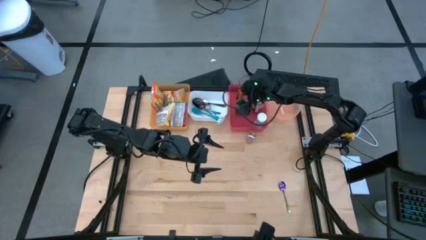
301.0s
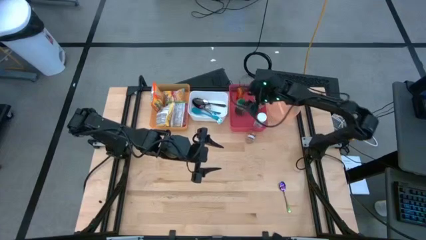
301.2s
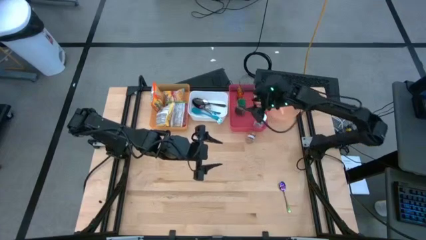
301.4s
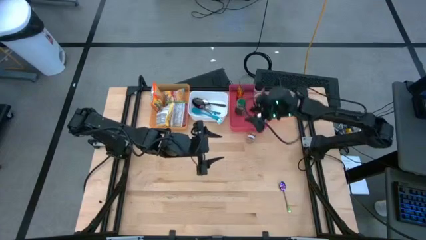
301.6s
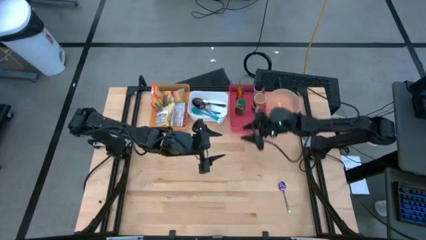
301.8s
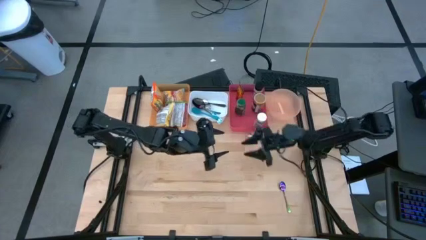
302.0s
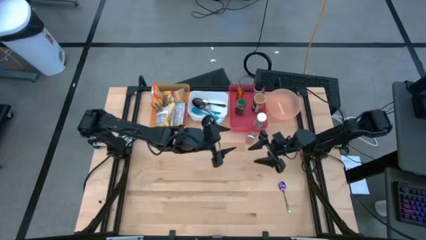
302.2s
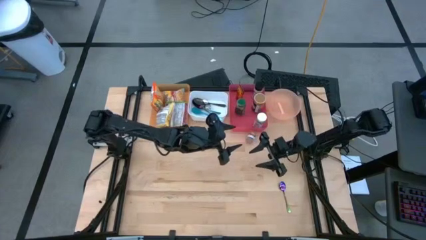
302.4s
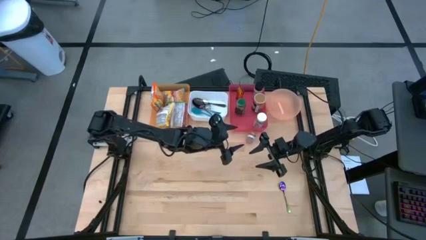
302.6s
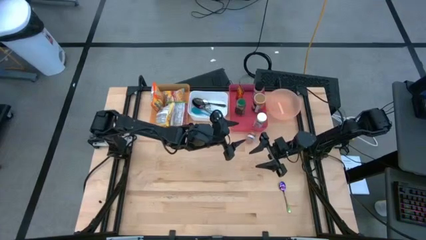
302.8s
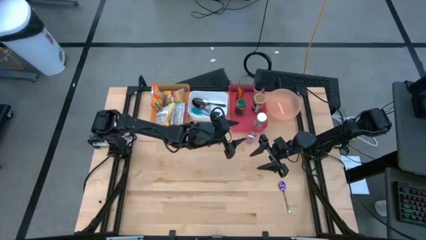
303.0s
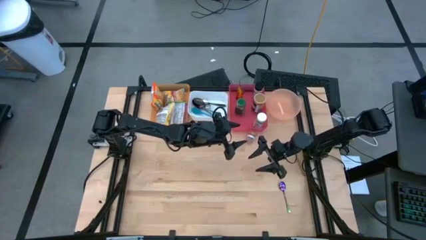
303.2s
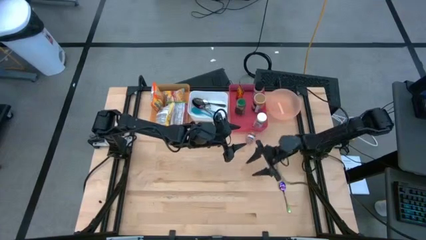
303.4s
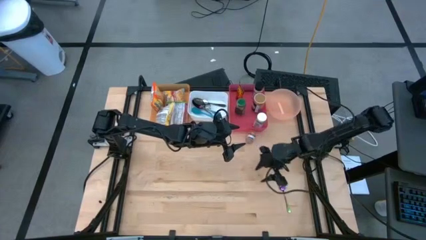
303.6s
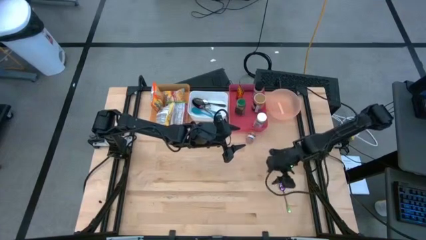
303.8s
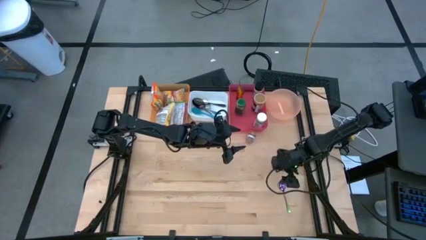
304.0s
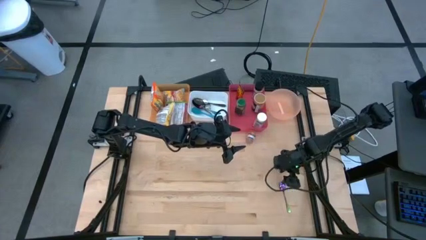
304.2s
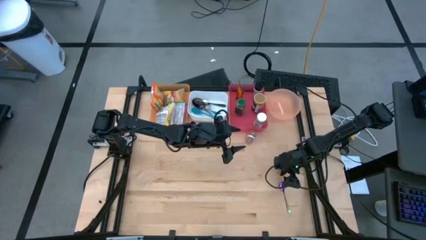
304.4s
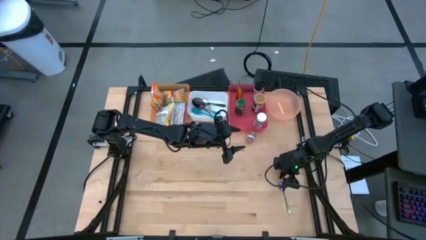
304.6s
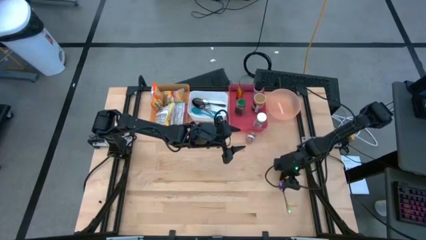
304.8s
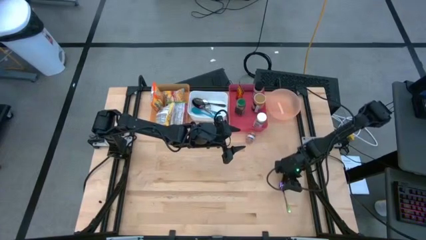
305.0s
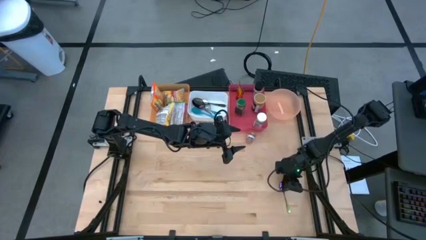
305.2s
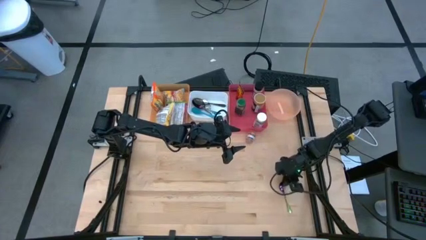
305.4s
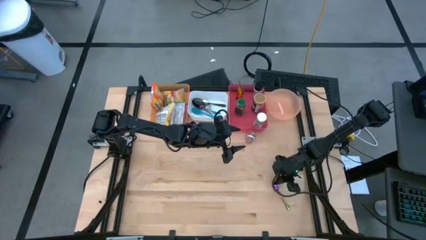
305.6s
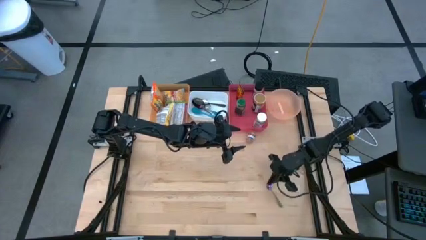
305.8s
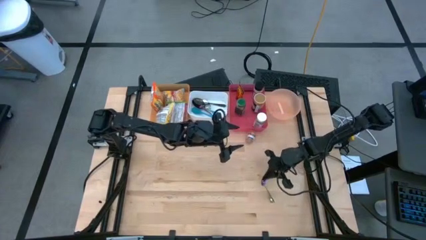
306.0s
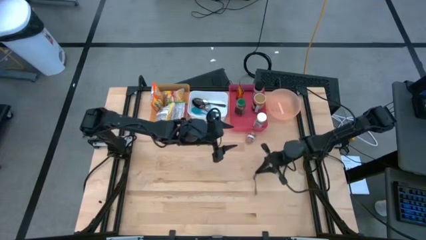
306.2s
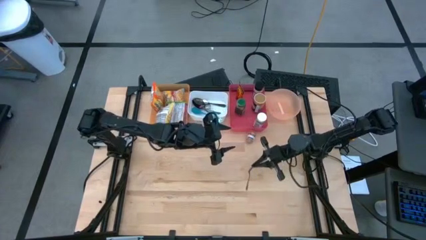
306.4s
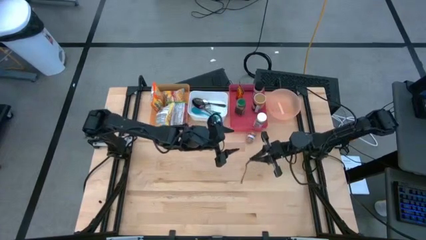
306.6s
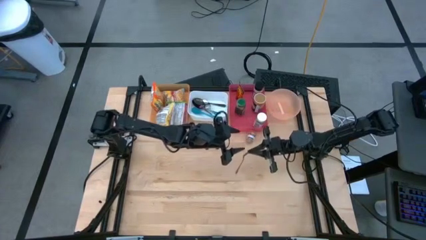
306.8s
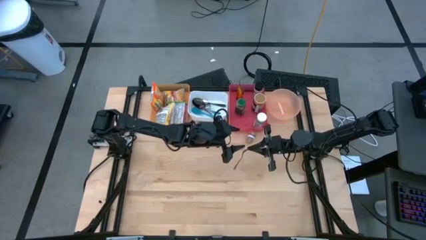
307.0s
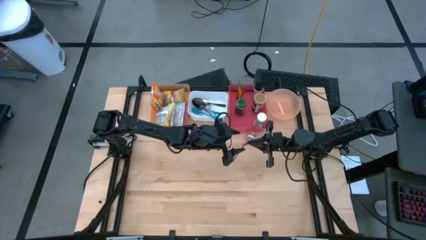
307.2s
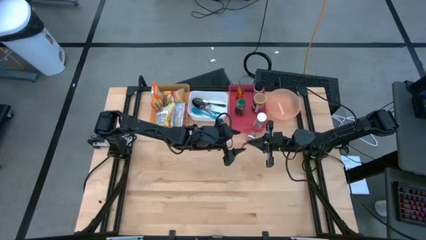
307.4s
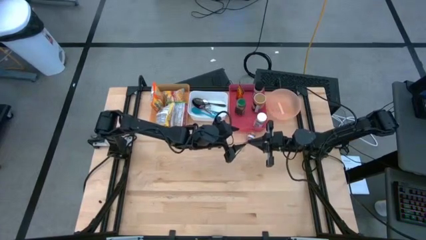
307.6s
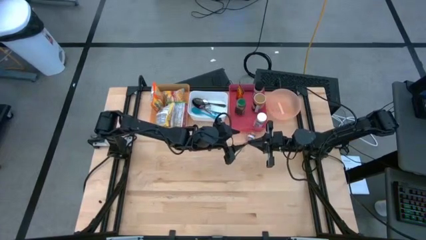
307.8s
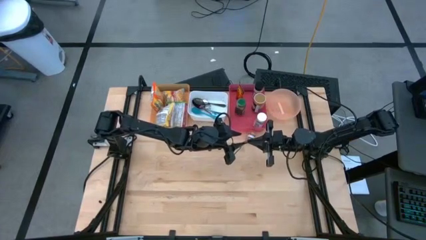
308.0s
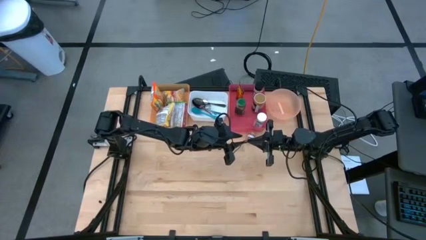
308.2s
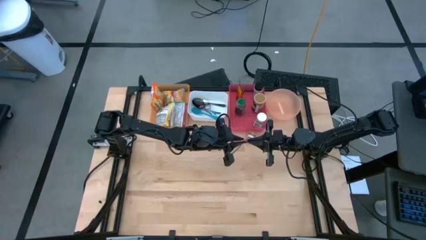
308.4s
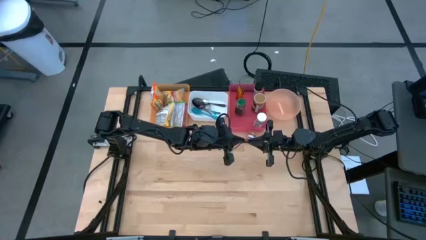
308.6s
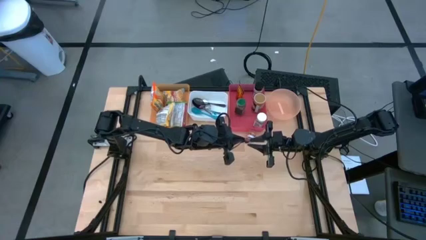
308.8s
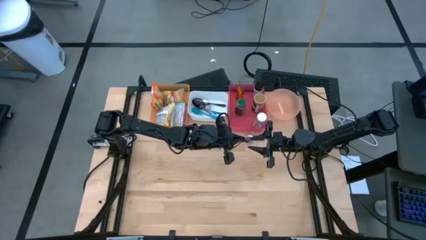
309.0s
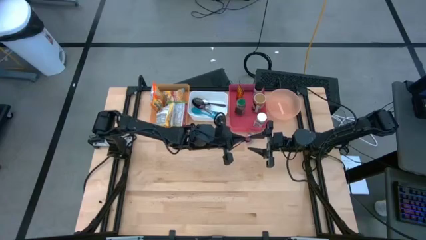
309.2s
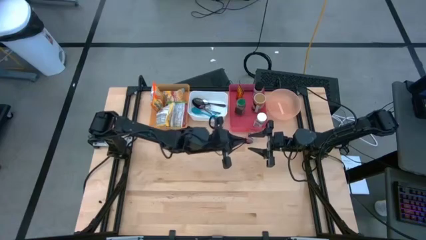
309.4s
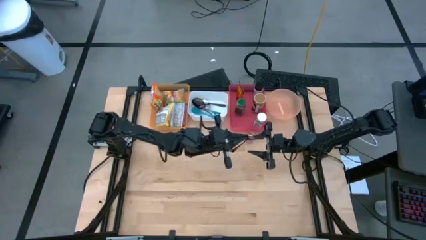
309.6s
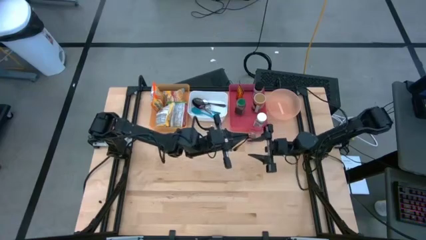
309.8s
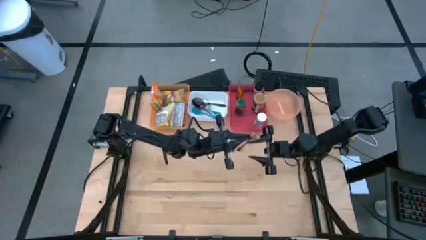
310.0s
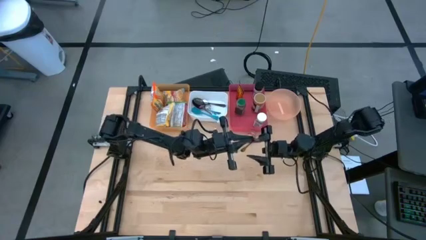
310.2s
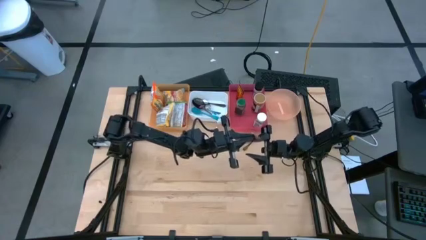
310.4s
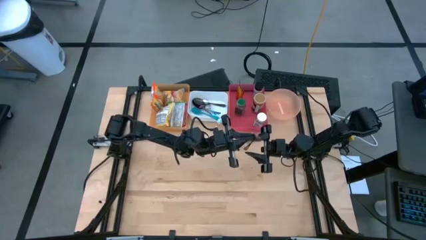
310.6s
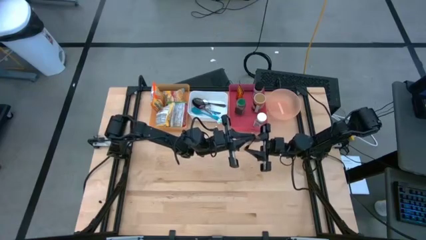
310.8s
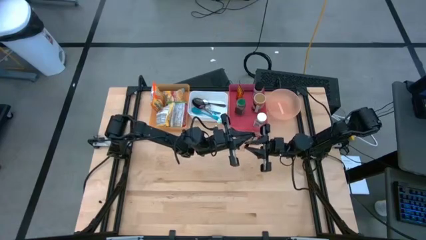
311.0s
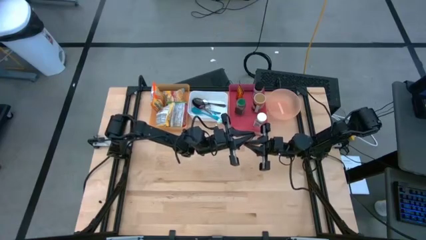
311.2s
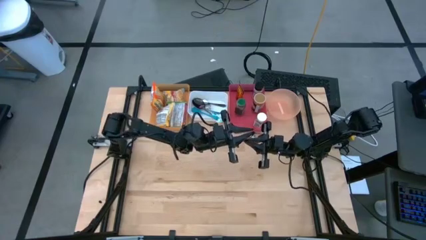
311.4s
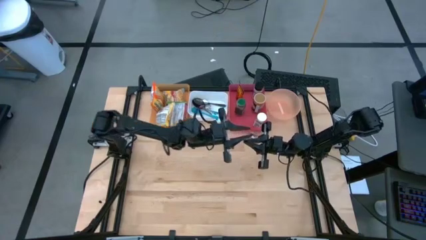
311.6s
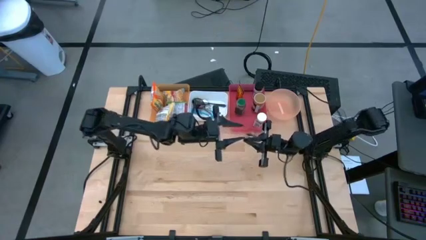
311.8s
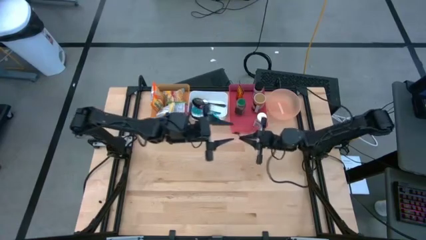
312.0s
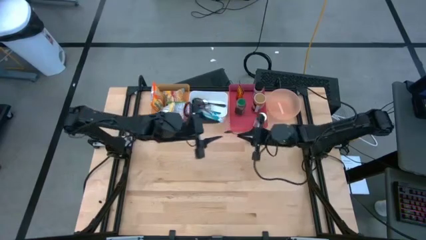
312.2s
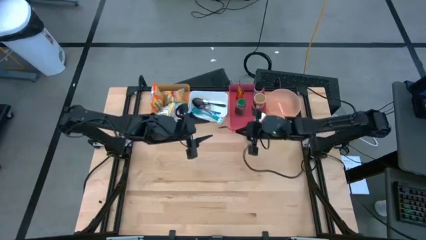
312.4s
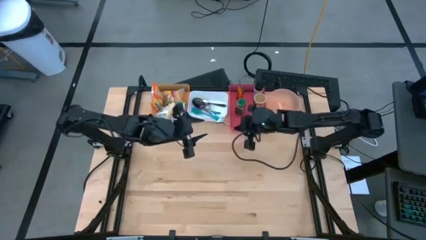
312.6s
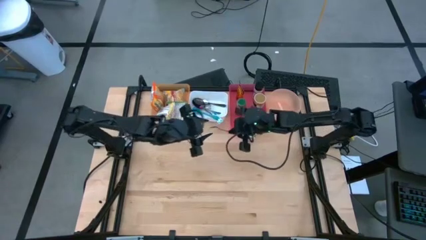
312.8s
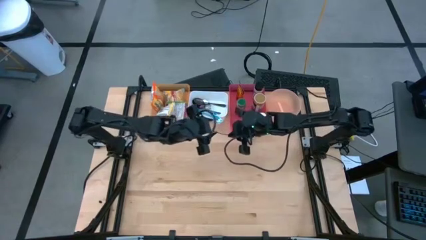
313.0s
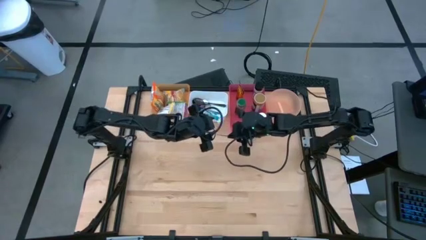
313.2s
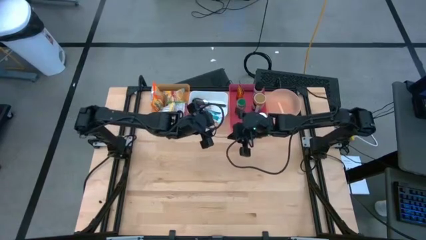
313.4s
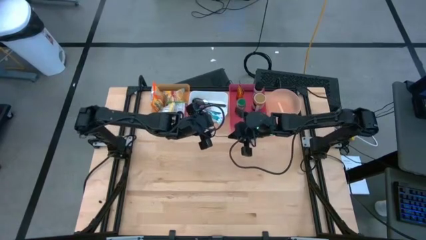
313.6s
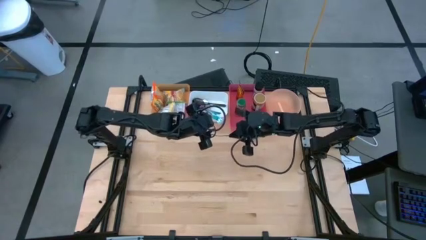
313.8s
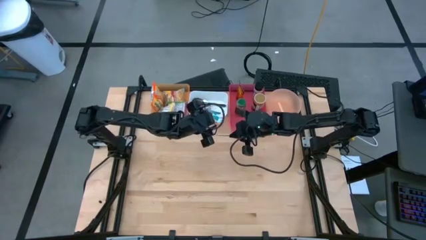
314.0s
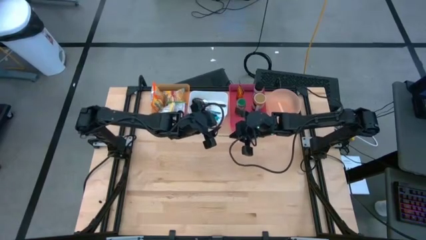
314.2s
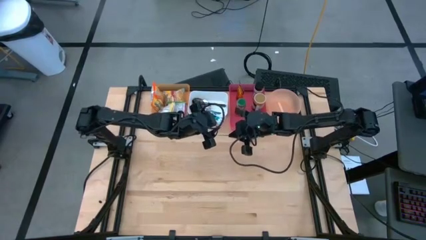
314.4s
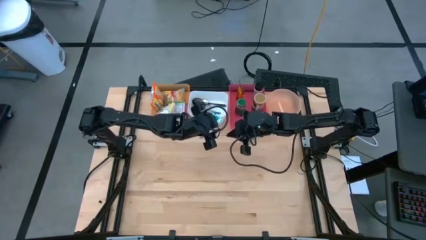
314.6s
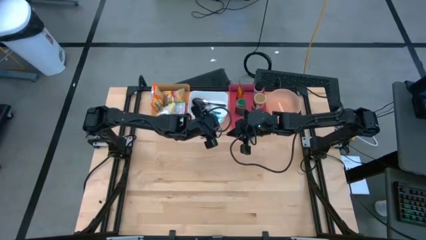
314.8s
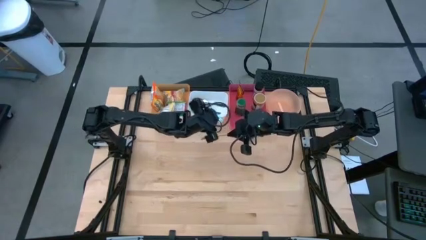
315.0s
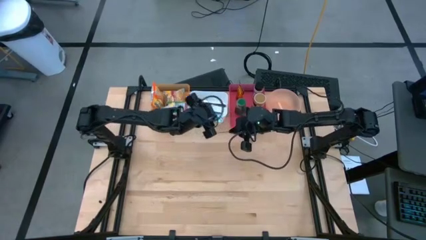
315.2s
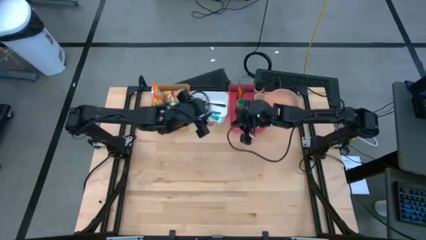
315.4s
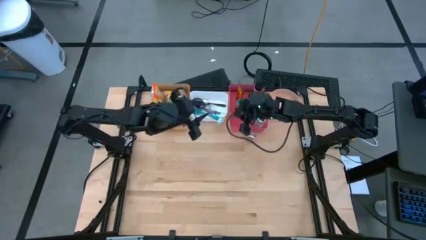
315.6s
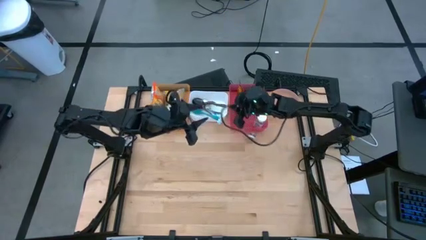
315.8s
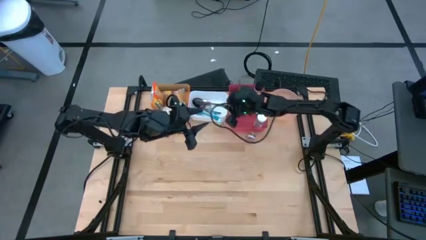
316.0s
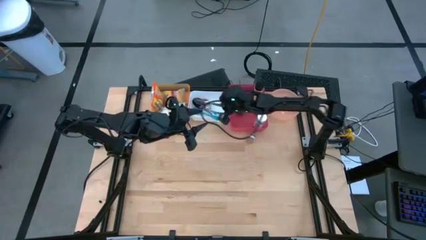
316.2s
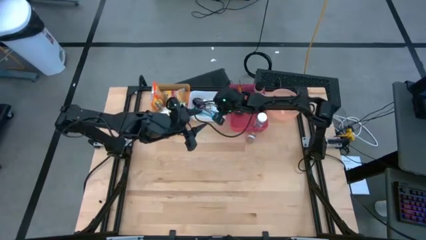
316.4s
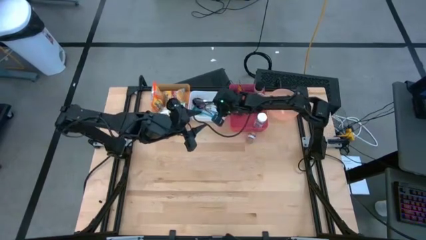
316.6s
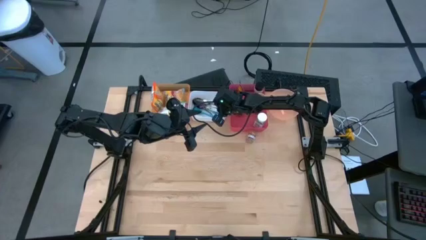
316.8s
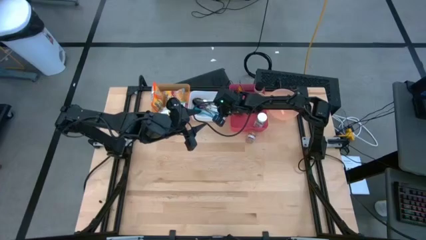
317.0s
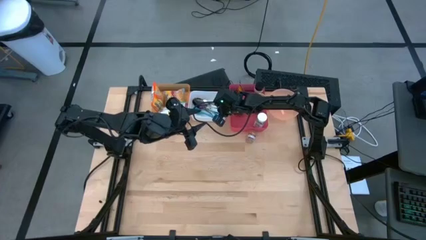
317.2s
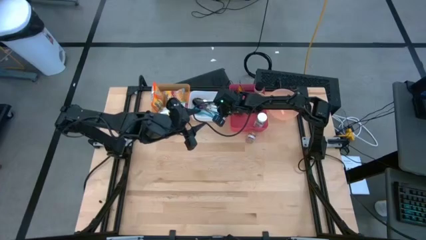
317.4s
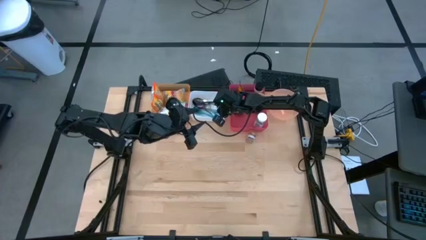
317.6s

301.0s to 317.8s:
Task: Pick & Place Food Item
Put the purple spoon into the white bin
